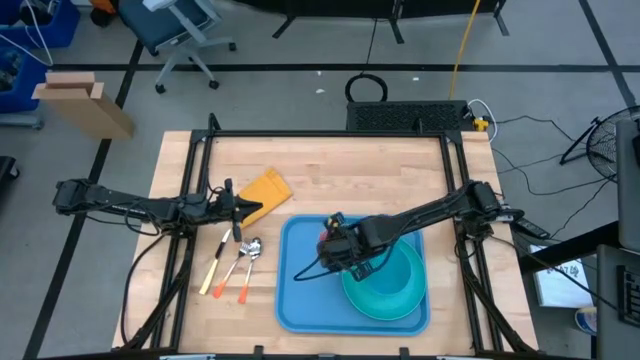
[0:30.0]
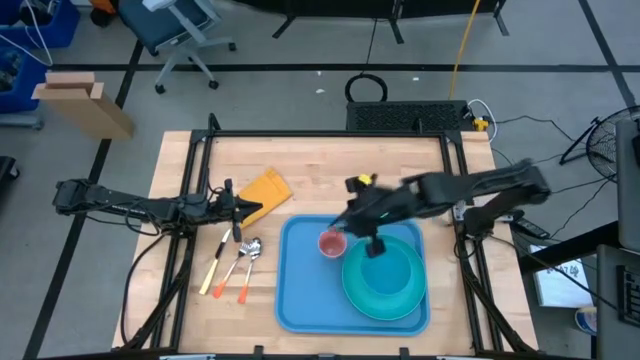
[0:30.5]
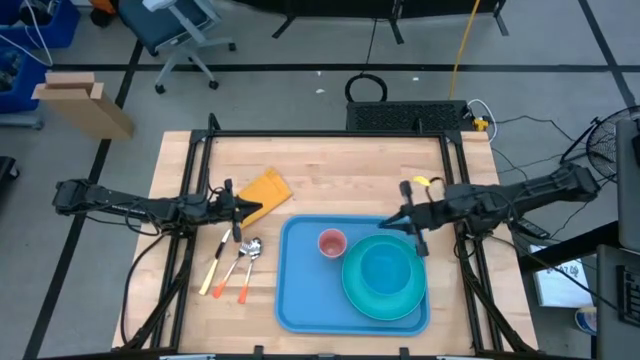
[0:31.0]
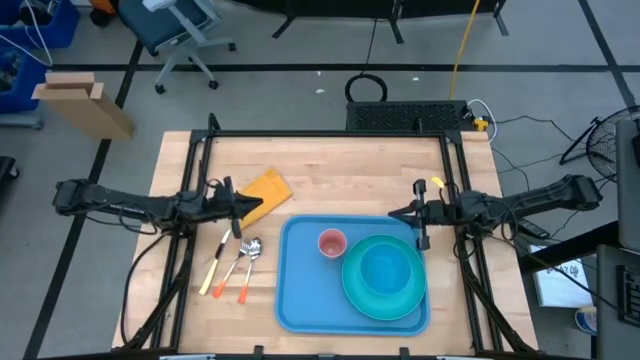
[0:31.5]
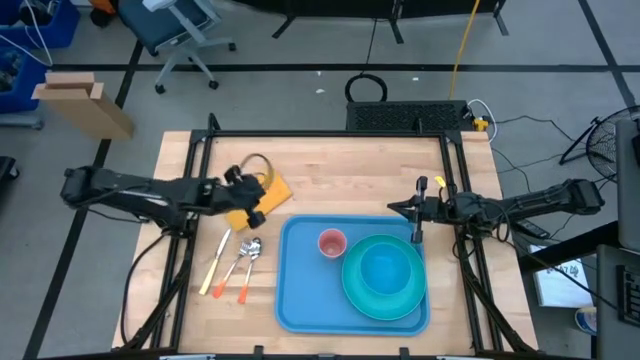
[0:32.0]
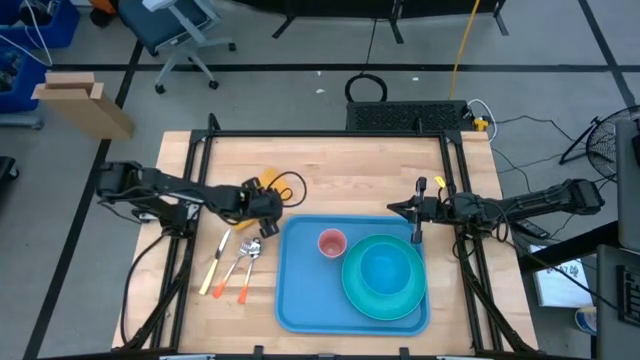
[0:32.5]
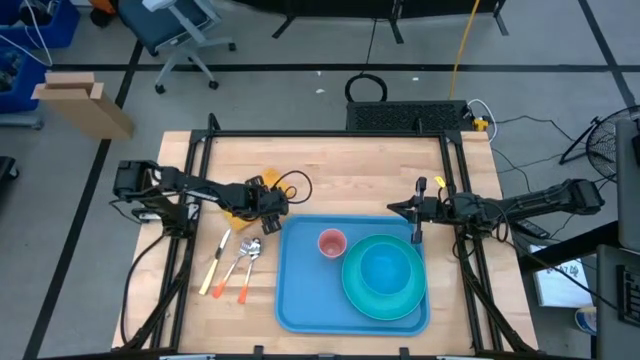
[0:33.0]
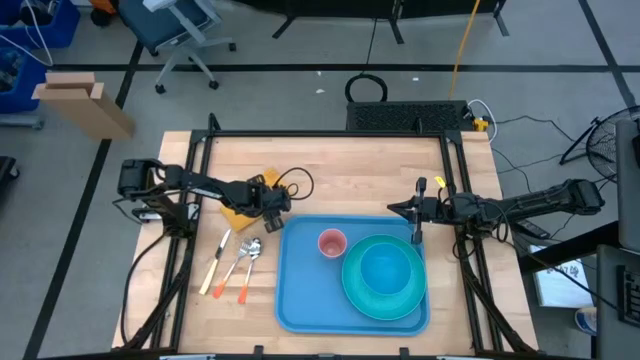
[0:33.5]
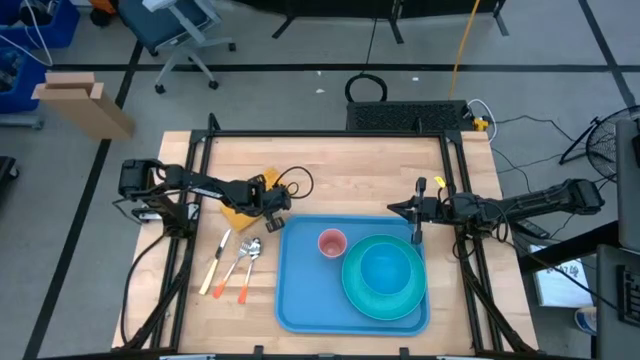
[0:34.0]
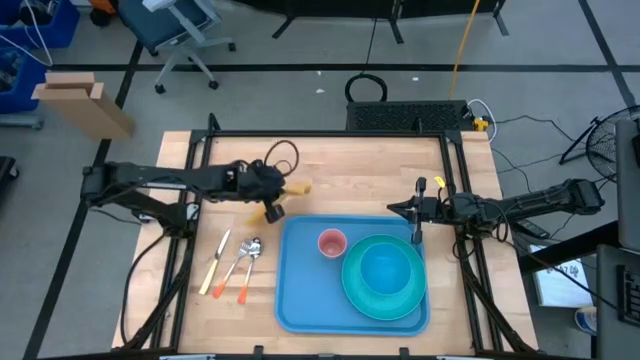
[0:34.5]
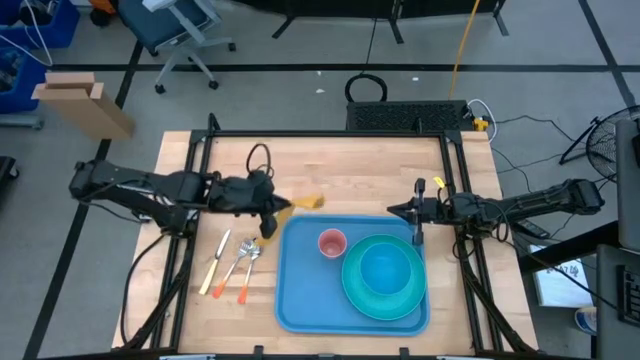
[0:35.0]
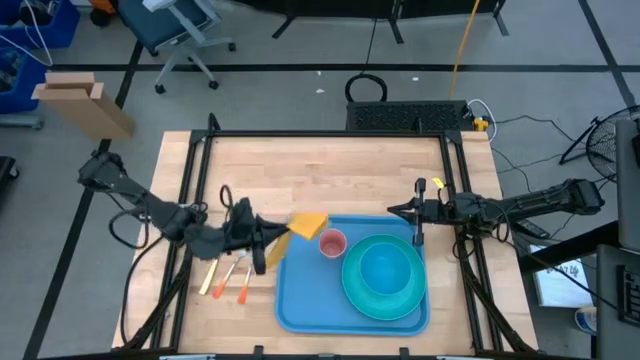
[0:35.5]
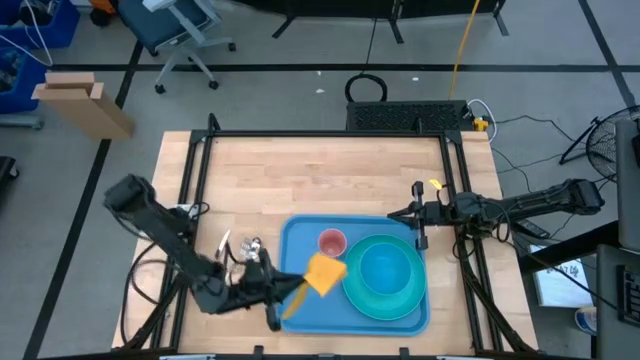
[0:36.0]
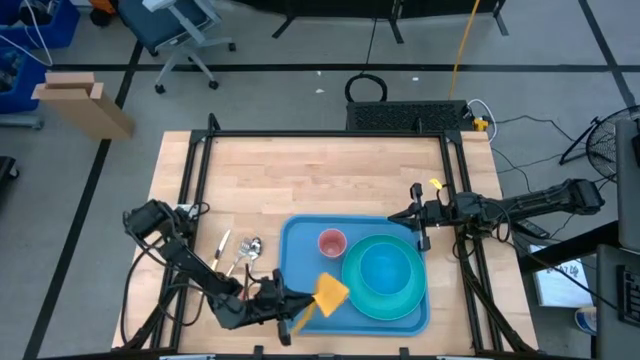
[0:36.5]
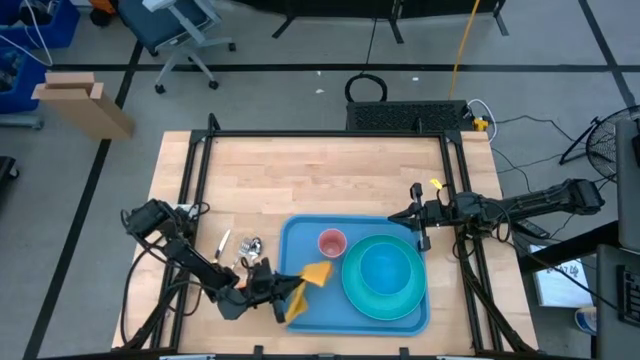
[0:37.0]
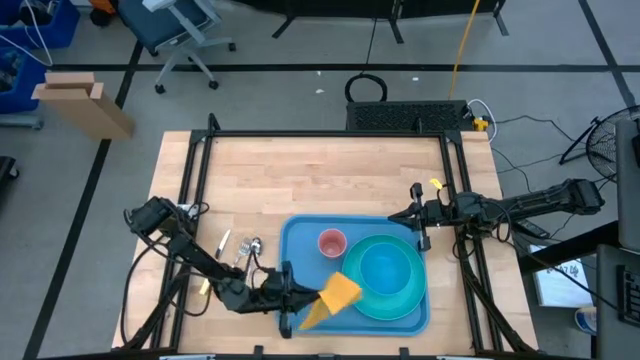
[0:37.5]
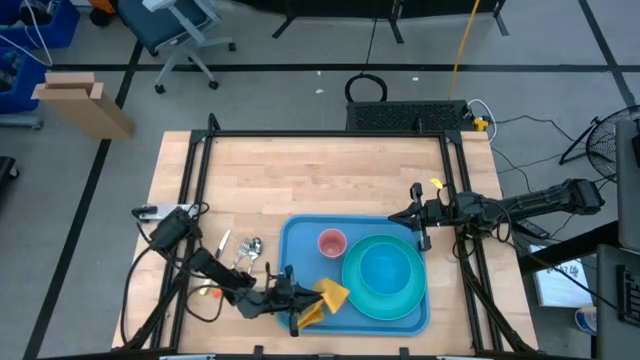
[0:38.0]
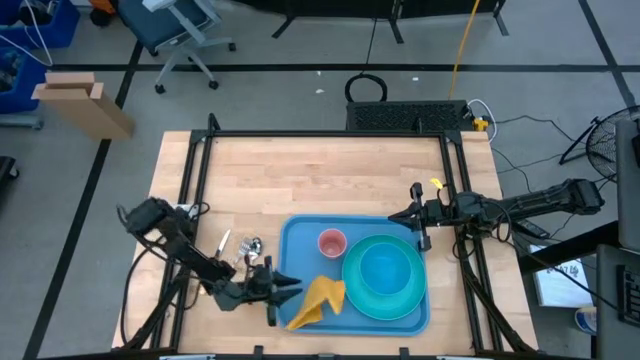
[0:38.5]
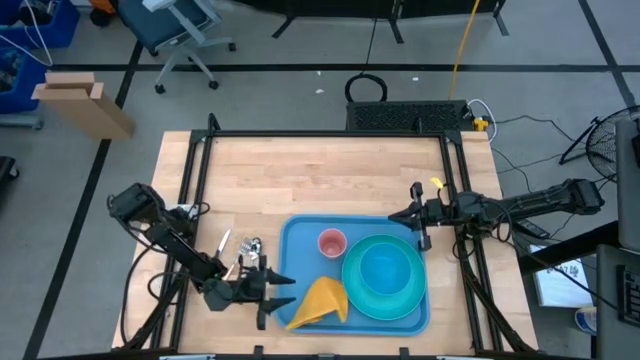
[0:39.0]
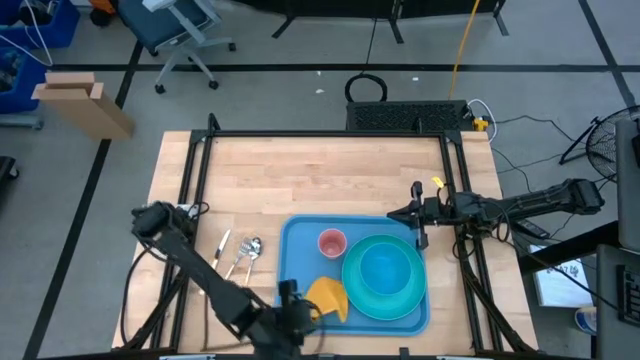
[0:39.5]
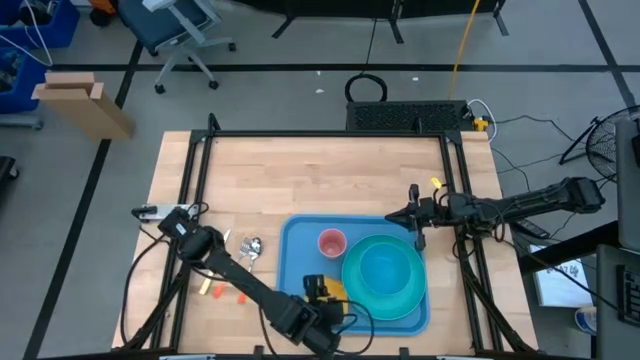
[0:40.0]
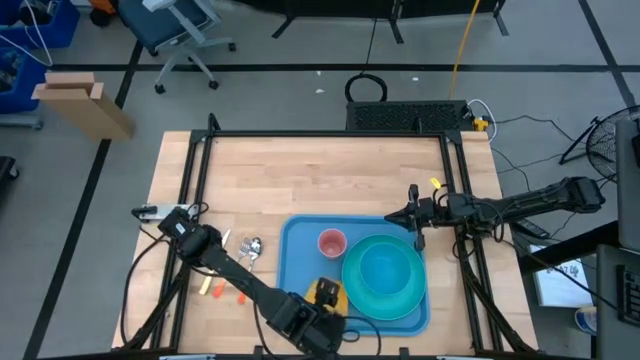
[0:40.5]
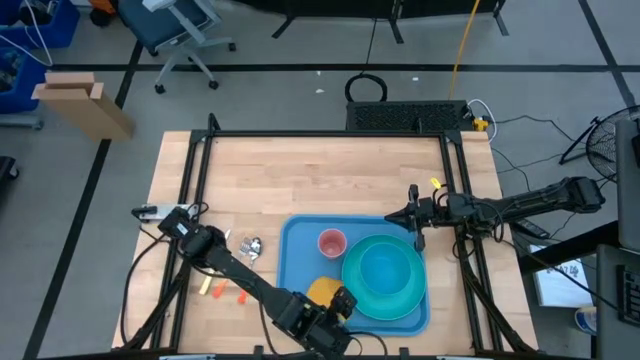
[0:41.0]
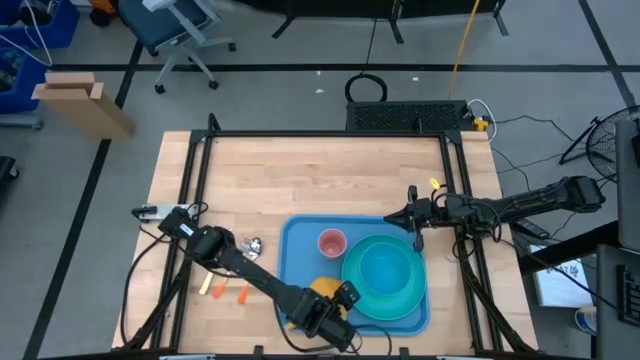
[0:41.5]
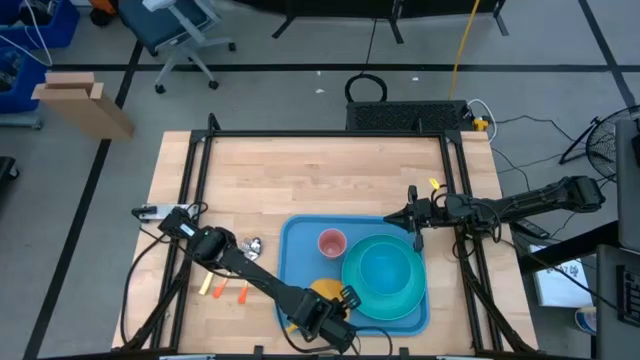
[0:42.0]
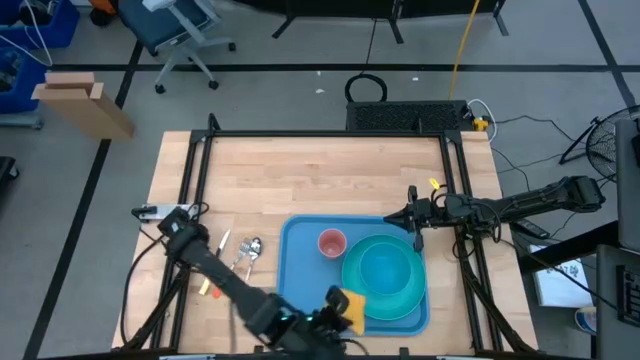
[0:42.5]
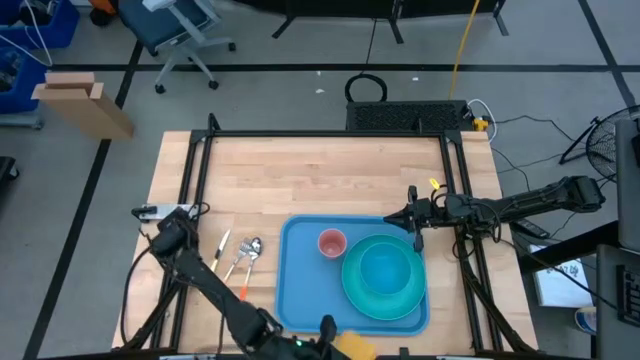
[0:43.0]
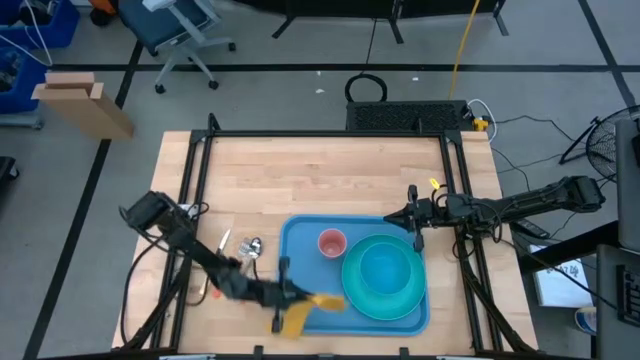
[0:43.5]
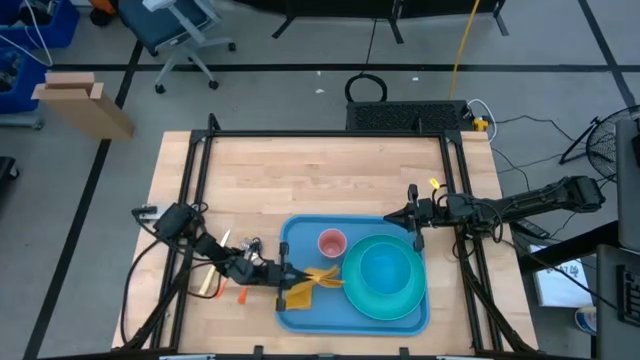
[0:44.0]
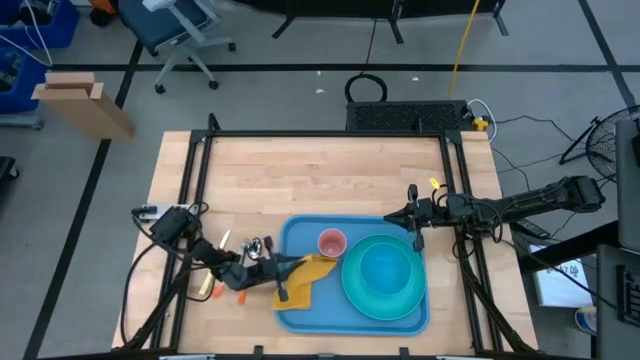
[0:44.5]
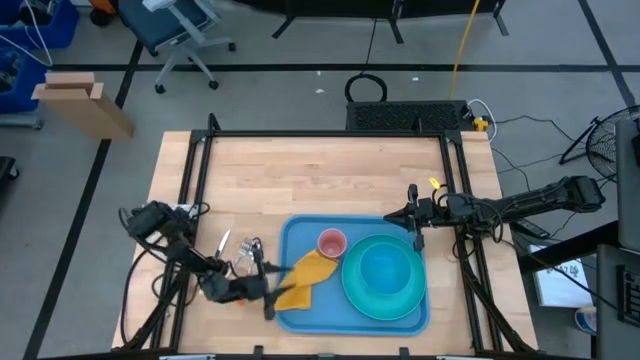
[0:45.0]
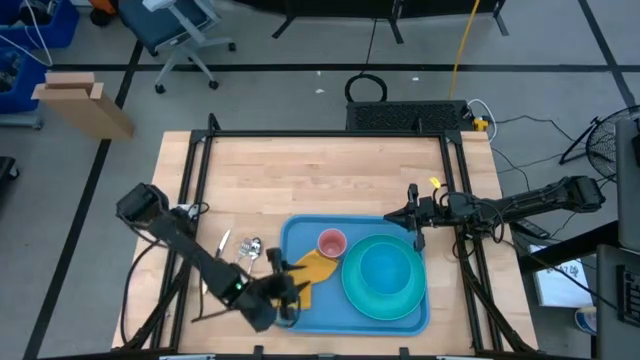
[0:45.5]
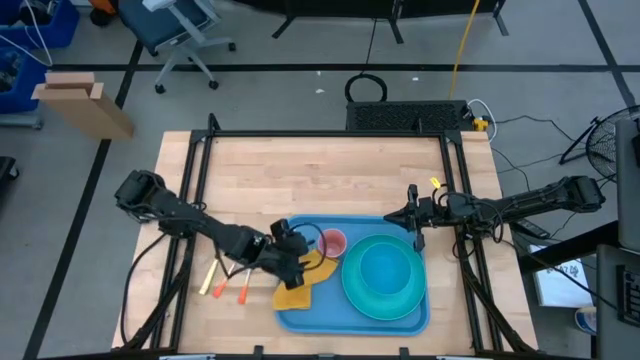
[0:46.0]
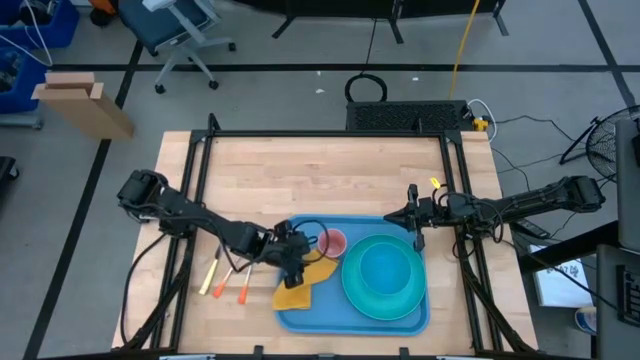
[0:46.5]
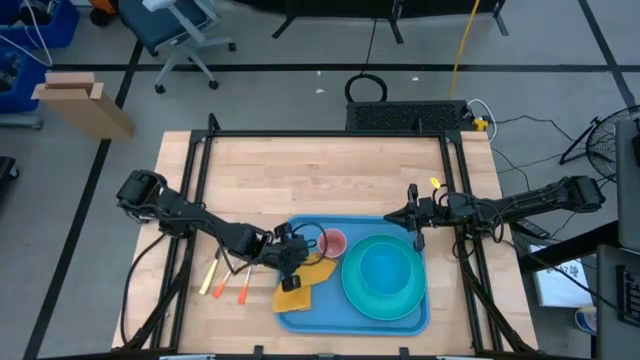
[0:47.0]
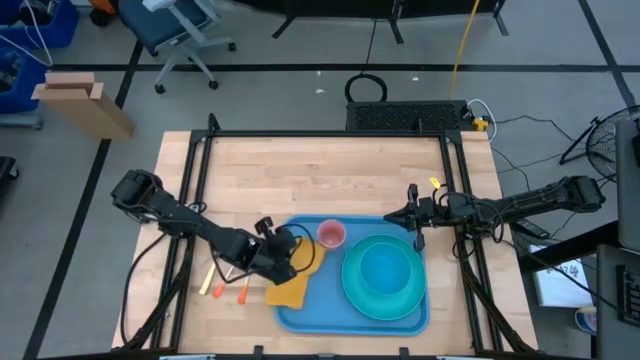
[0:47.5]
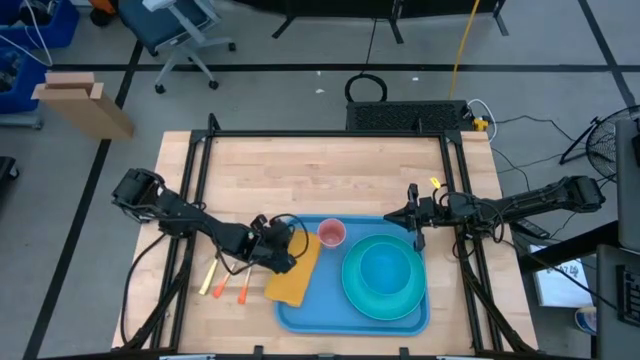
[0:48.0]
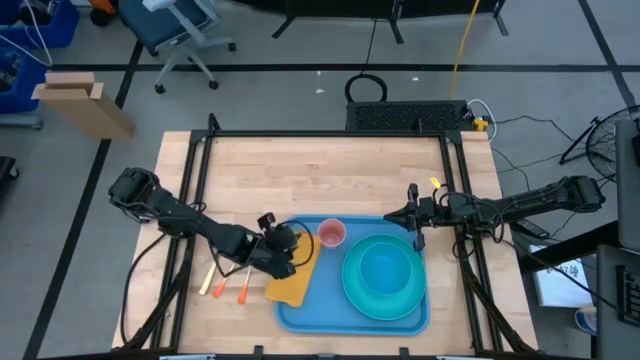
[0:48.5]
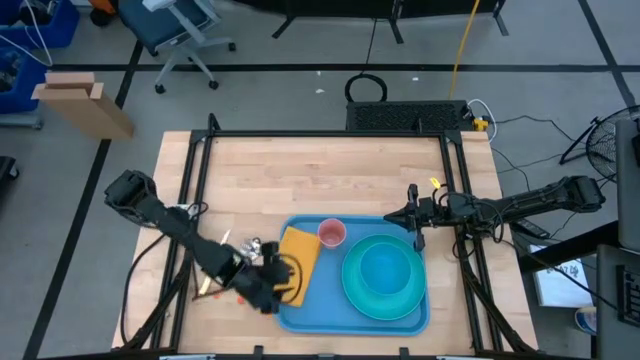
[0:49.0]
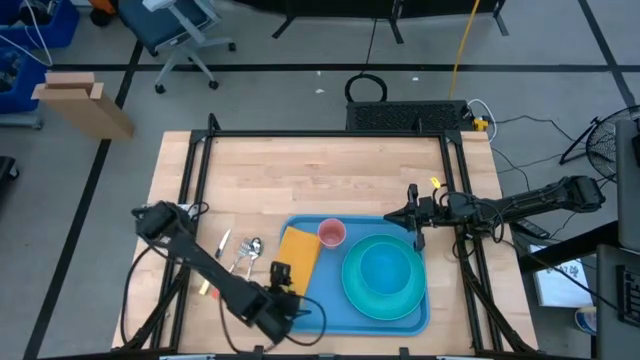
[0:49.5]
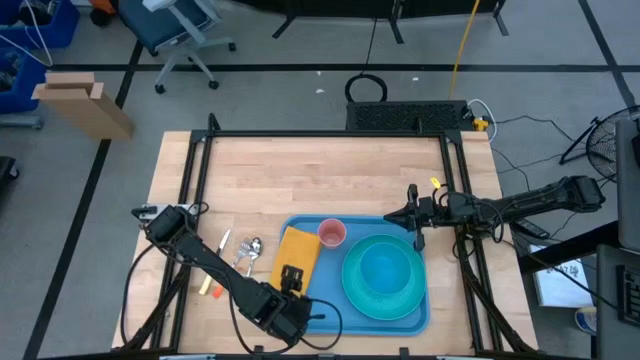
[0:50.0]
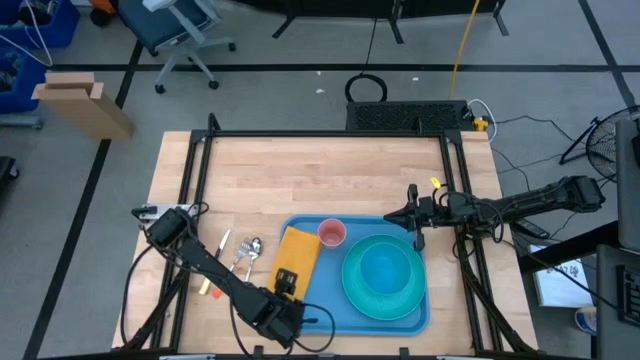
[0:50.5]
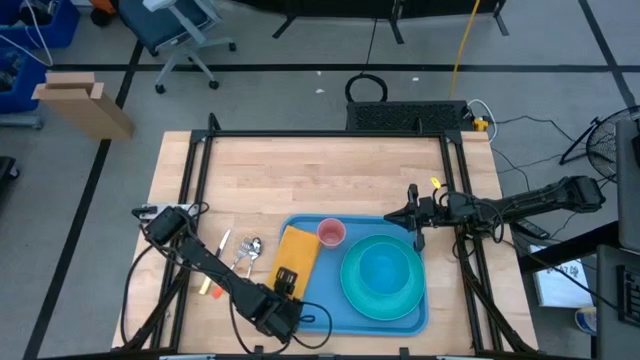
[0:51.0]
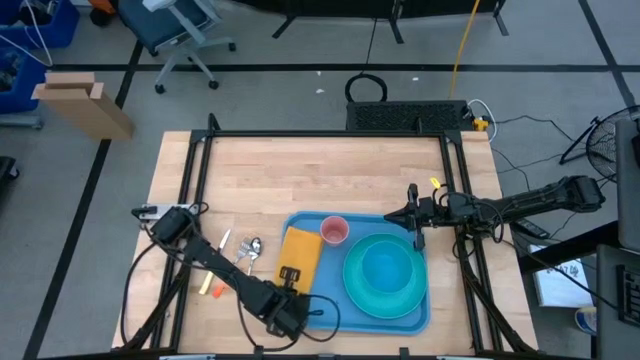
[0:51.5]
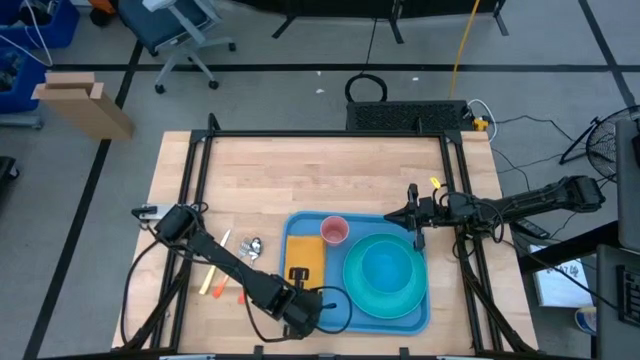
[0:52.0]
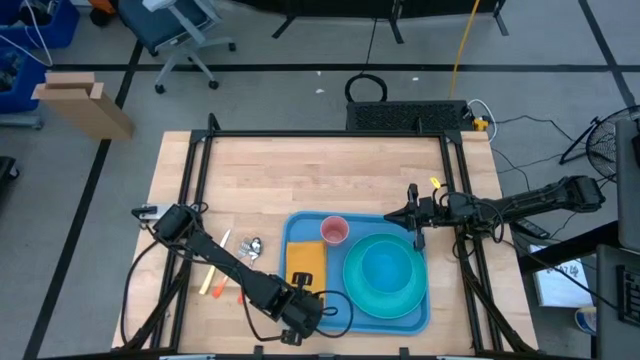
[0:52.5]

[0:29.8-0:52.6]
Task: Set up tray
Put the napkin on top of the tray
